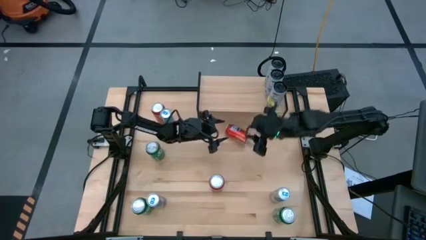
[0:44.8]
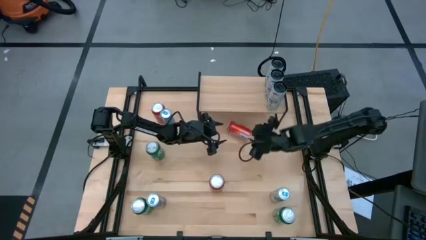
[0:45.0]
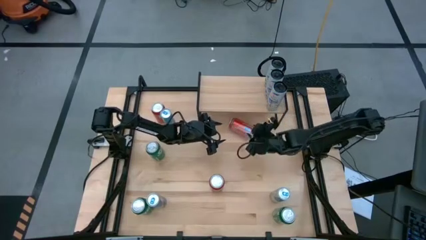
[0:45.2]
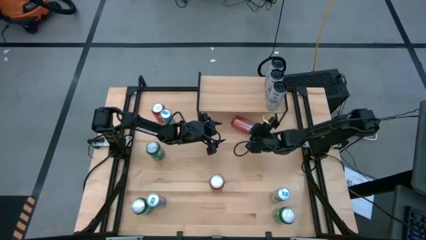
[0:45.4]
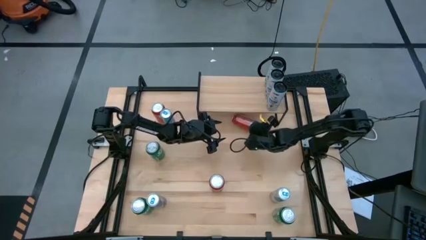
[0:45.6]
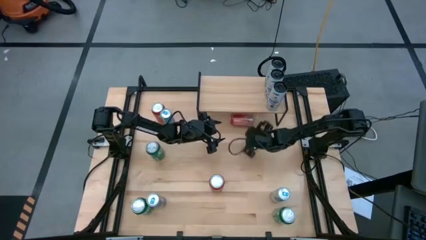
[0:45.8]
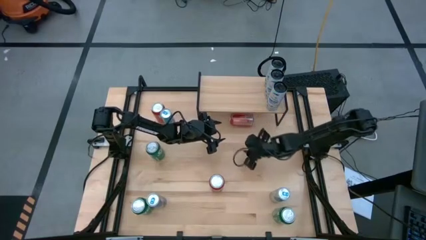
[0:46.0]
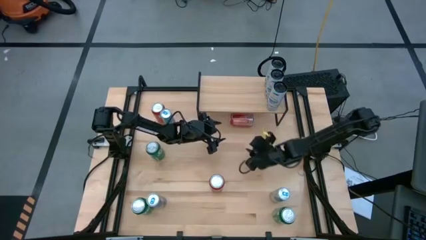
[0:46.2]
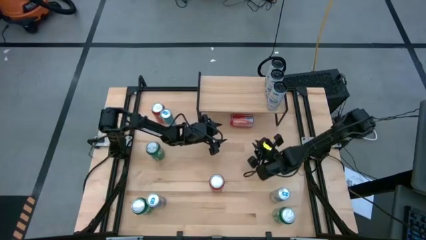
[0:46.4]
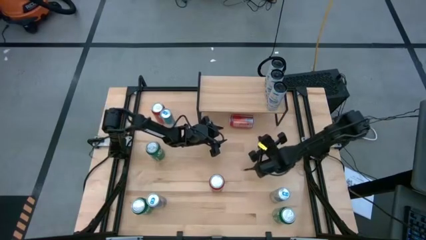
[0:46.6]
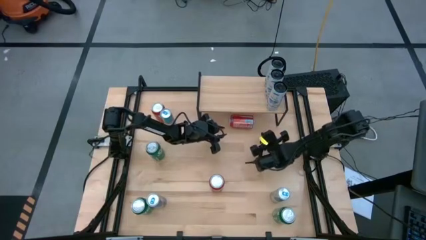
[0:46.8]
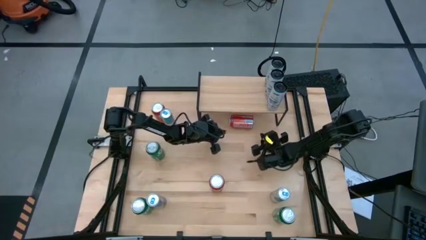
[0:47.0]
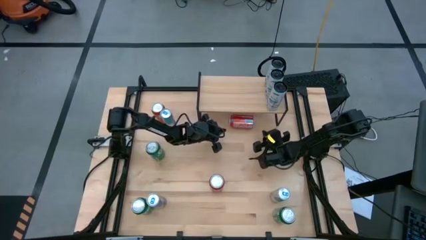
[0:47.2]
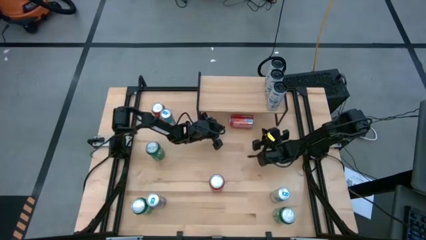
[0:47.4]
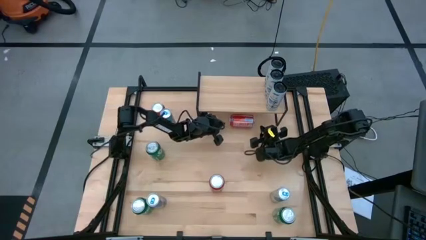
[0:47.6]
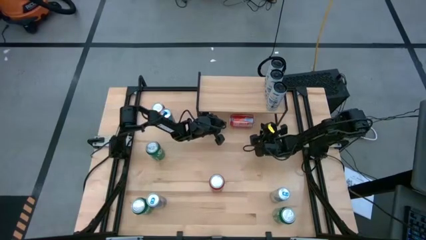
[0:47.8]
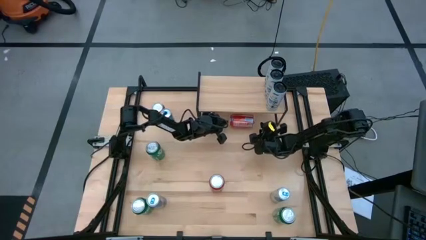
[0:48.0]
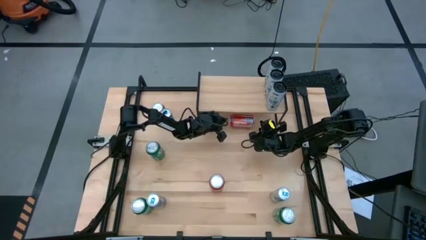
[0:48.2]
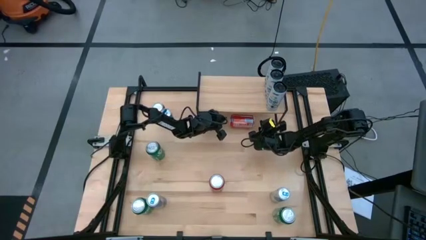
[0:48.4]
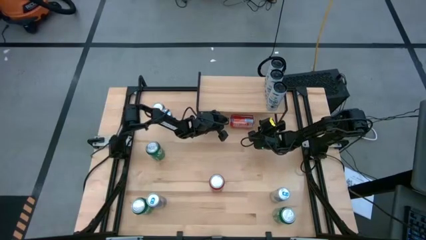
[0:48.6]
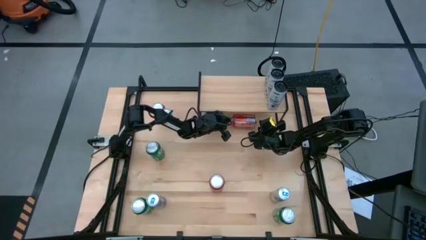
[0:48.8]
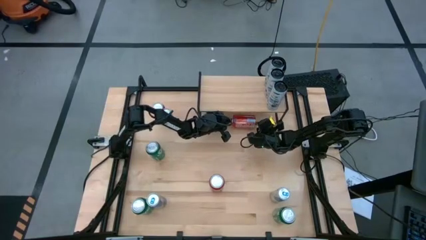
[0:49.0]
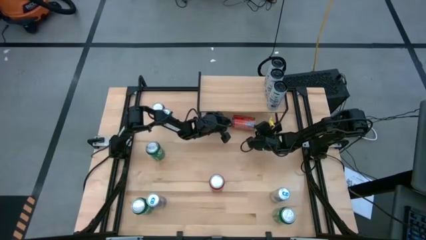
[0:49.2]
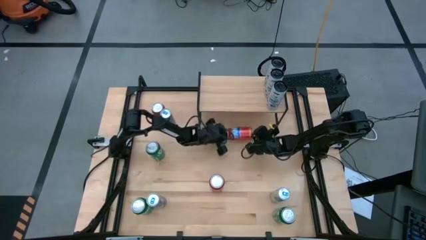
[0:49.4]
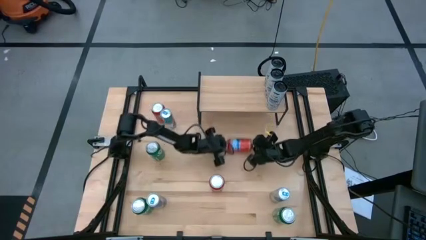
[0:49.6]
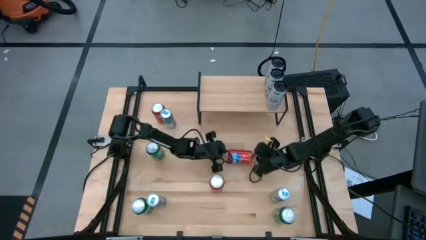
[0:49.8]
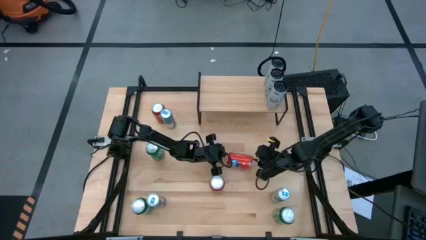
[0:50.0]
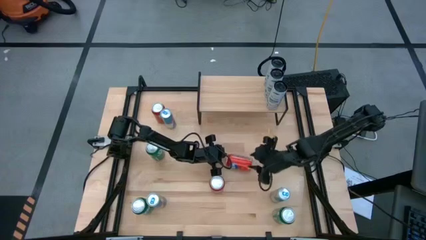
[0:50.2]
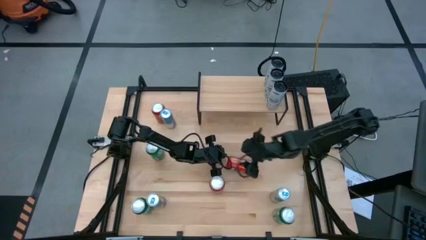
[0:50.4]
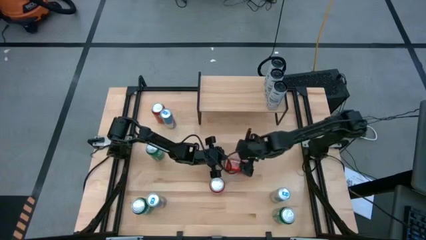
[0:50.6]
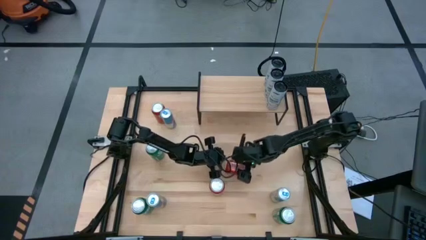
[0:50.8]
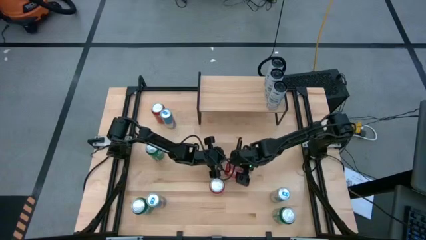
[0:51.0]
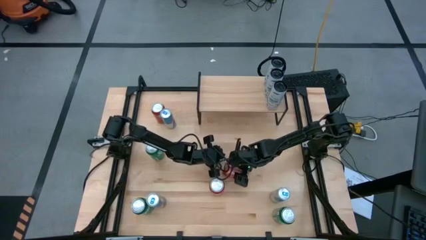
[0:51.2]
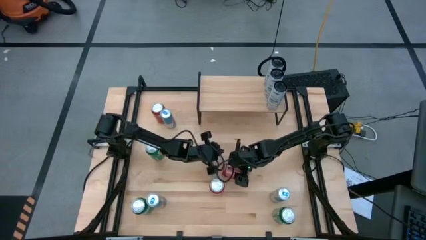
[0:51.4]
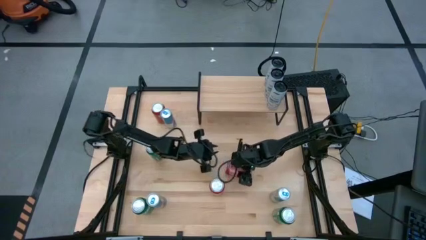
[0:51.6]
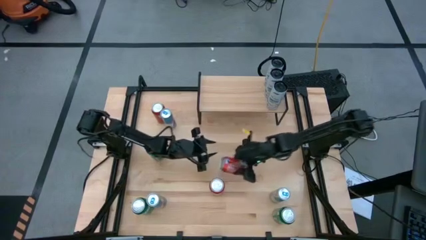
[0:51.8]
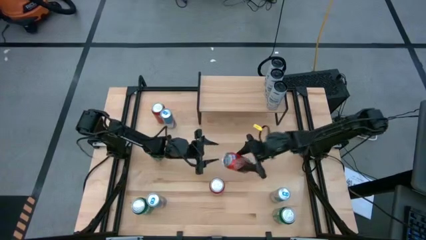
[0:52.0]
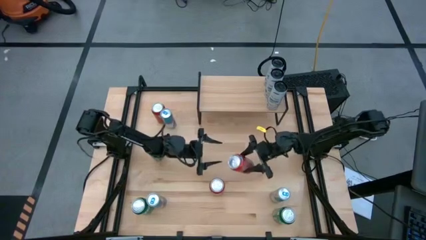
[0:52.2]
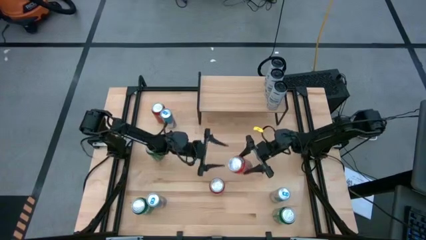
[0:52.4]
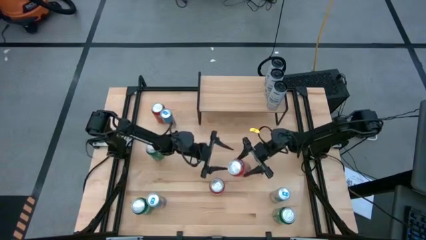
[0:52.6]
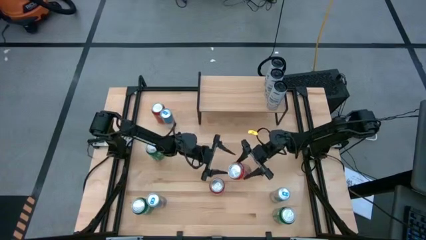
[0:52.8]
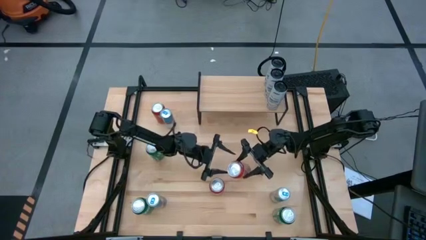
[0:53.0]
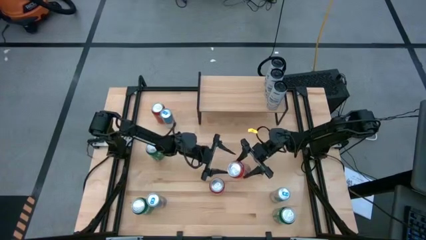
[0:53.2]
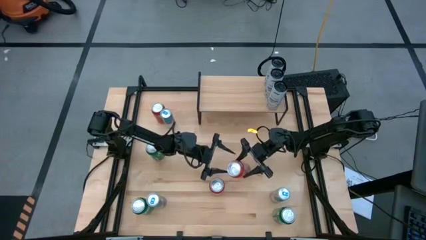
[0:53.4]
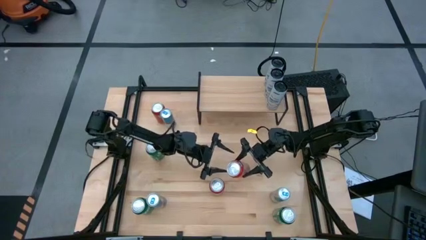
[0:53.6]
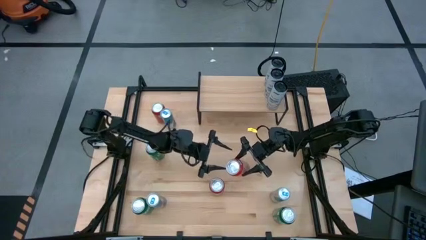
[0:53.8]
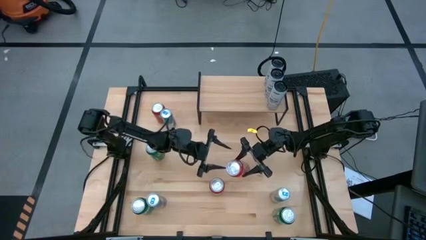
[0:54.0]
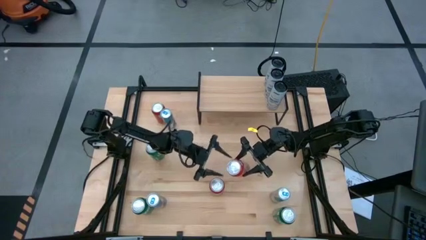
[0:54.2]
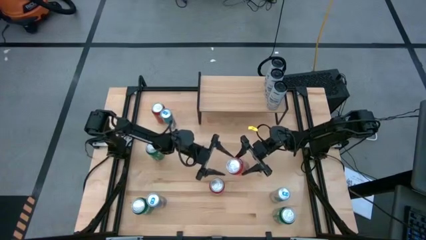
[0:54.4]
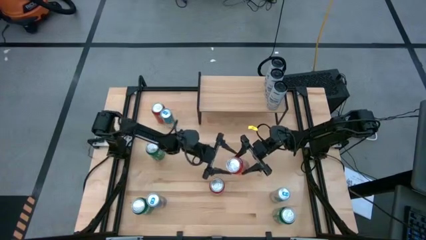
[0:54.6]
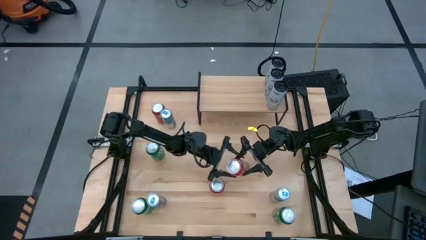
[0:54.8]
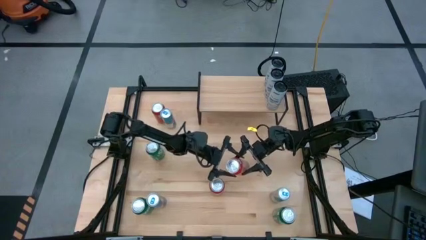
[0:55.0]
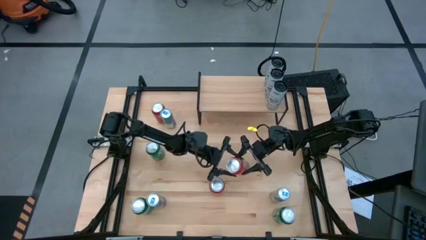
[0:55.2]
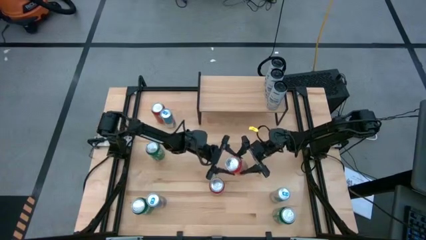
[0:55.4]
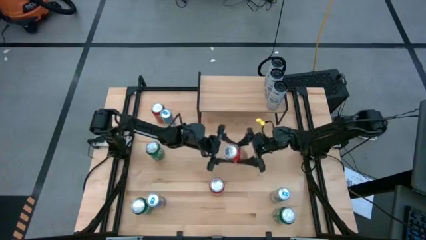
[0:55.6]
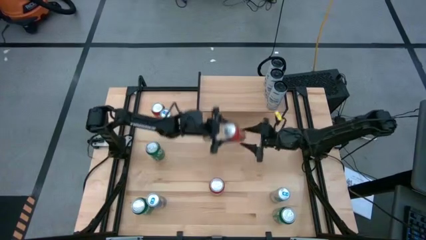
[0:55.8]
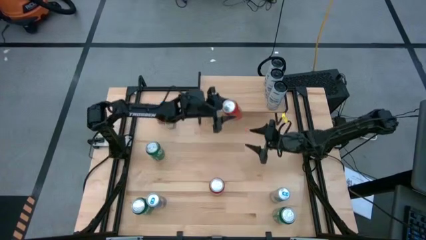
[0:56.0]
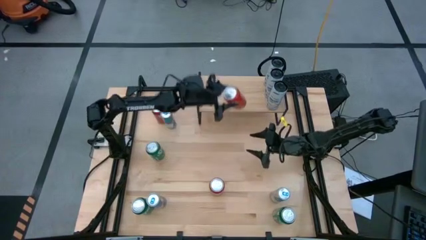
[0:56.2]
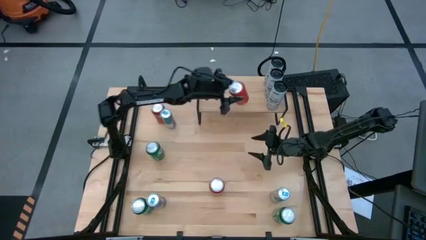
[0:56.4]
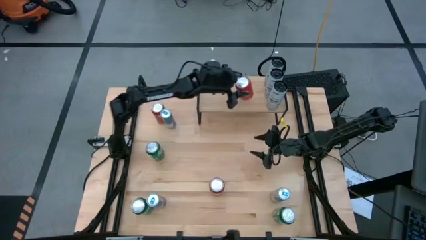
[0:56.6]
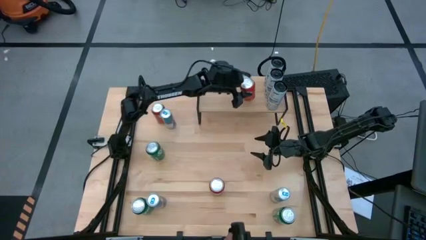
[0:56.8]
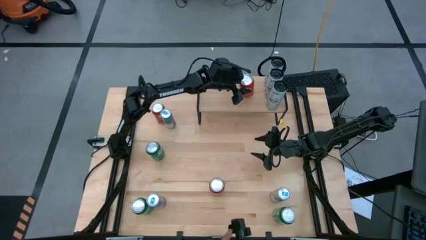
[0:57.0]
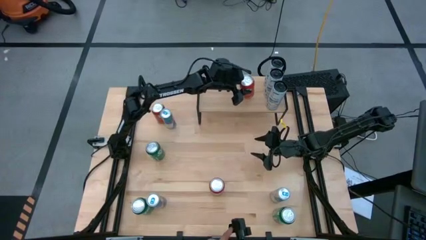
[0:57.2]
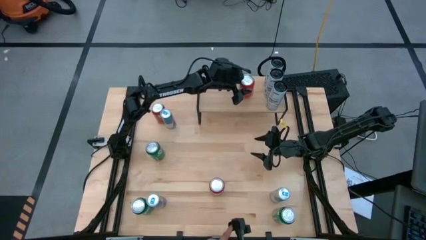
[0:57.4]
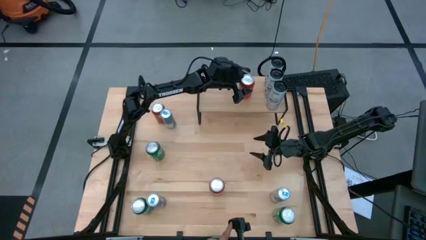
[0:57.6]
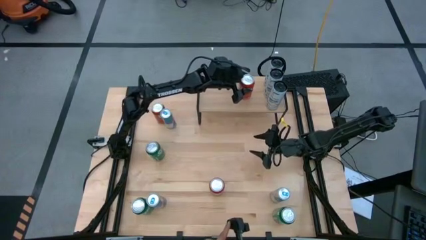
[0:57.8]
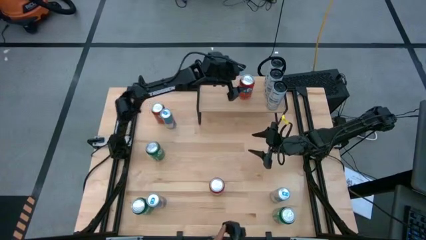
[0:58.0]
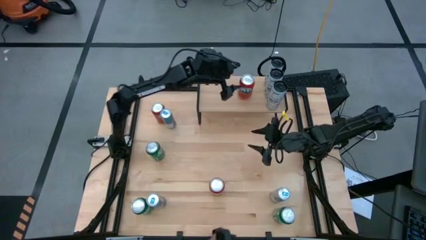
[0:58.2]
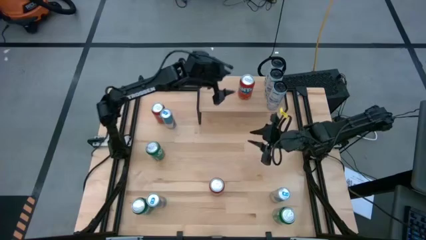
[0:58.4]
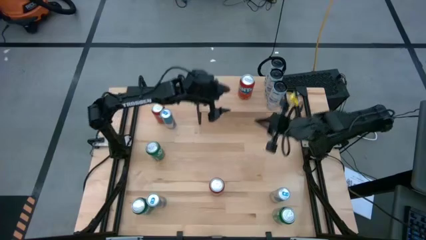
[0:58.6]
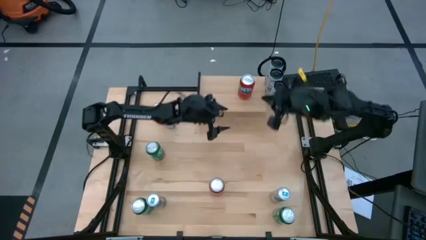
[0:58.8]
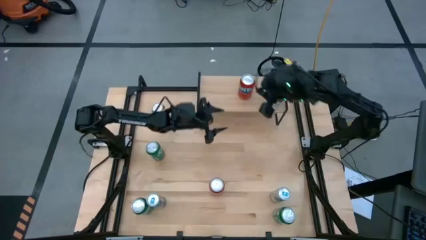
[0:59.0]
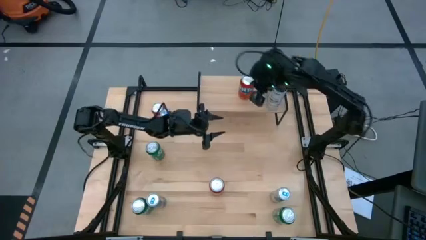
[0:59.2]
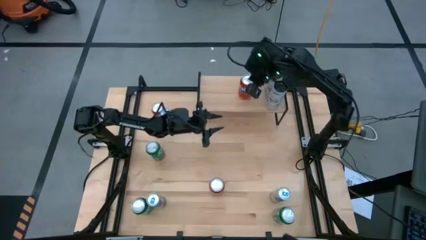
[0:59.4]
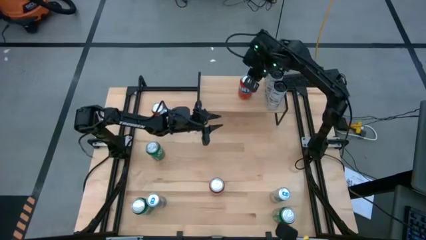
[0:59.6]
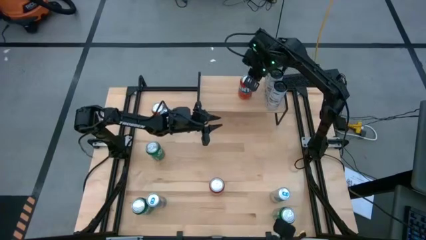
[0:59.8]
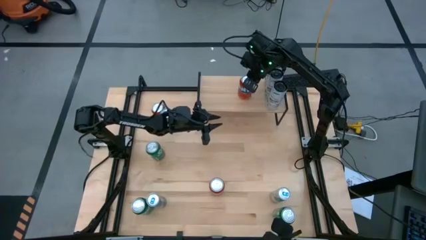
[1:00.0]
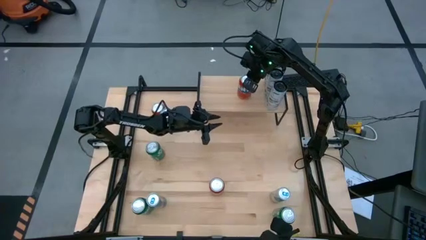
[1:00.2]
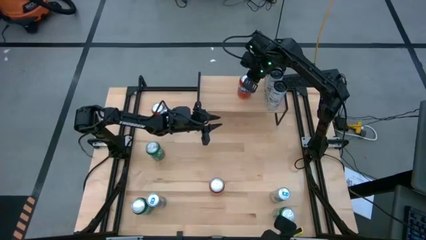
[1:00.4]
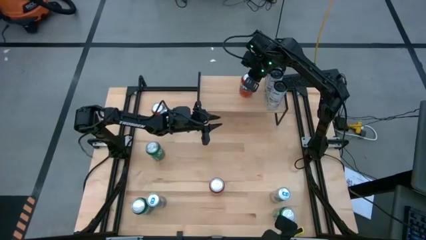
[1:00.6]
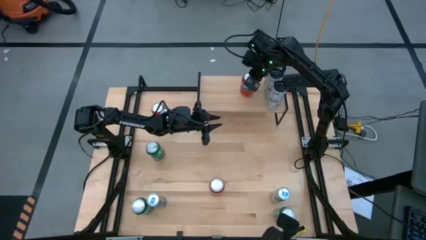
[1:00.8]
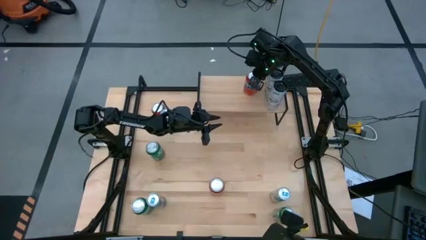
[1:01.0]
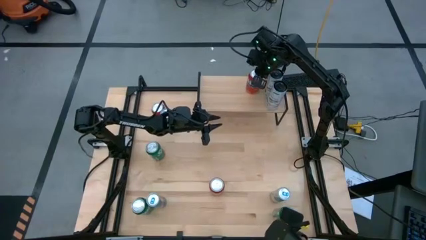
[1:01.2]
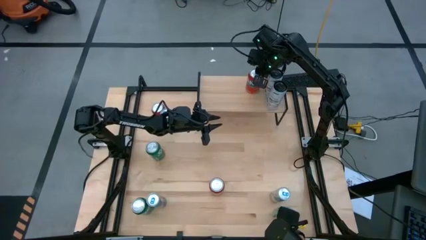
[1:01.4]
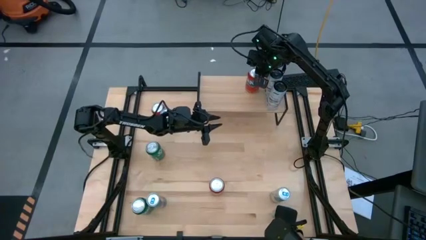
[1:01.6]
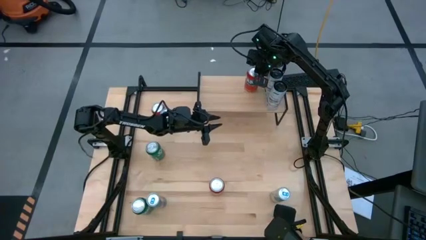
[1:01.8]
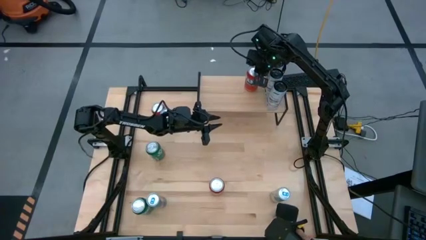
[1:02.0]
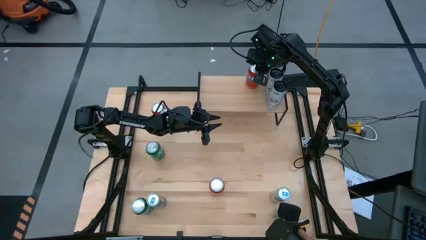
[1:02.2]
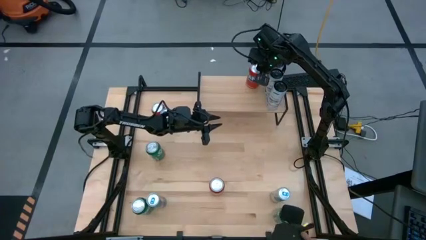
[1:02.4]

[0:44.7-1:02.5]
Task: Place canned beverage on shelf
Put the bottom right red soda can on the shelf
